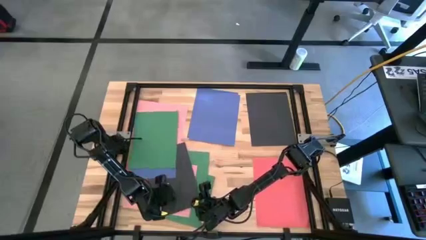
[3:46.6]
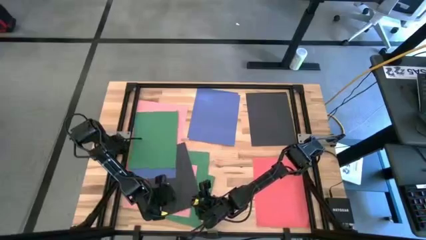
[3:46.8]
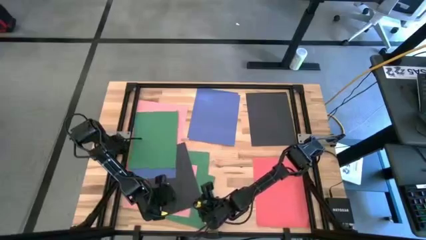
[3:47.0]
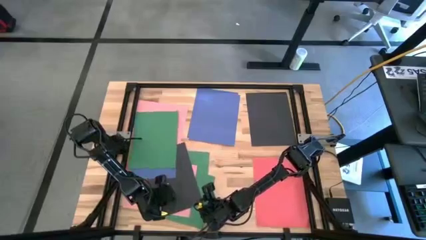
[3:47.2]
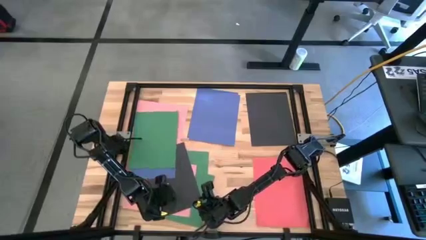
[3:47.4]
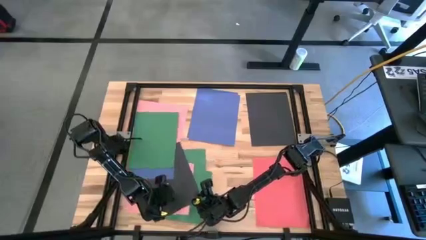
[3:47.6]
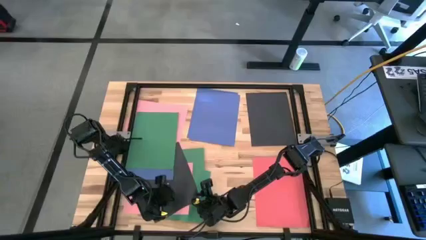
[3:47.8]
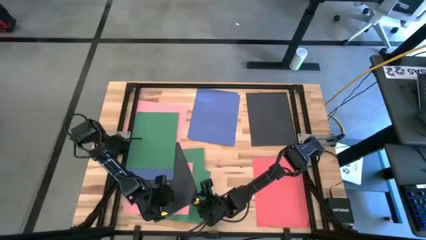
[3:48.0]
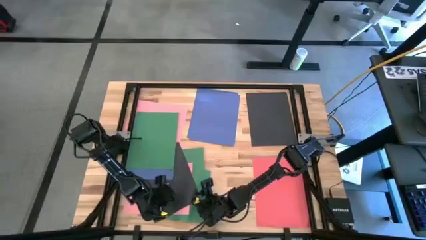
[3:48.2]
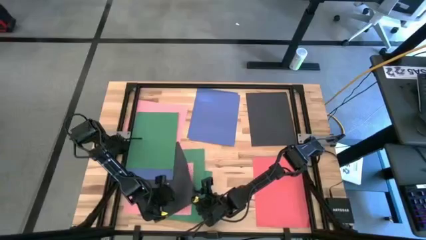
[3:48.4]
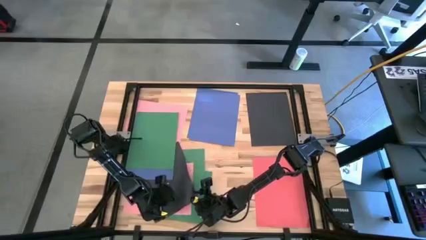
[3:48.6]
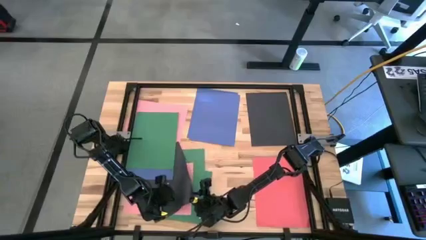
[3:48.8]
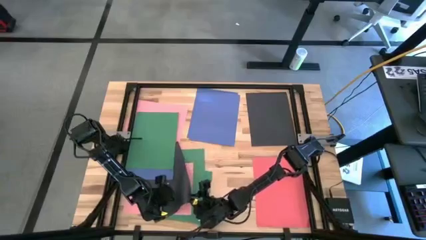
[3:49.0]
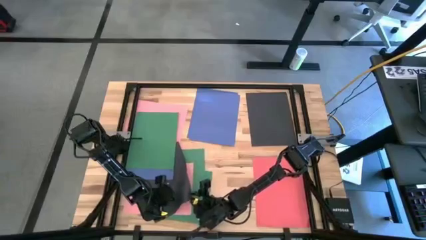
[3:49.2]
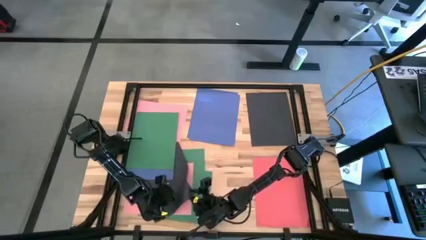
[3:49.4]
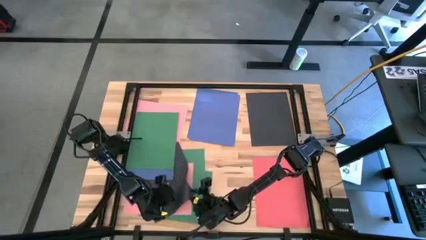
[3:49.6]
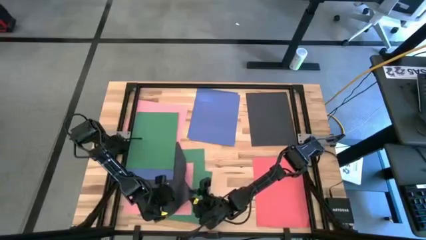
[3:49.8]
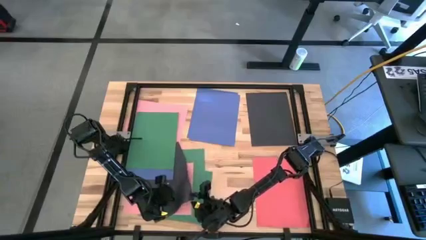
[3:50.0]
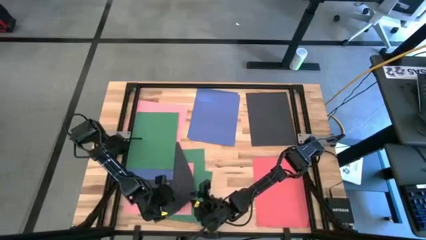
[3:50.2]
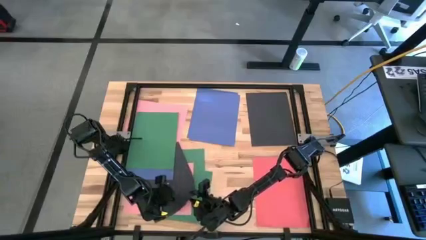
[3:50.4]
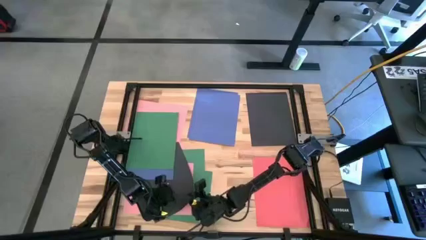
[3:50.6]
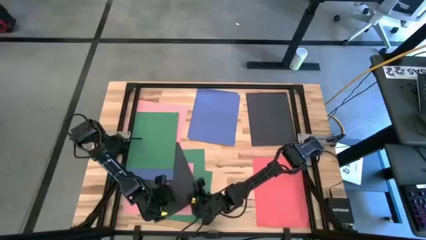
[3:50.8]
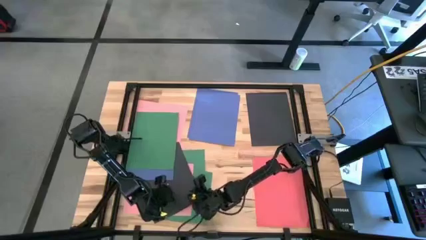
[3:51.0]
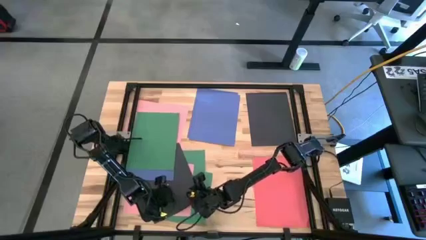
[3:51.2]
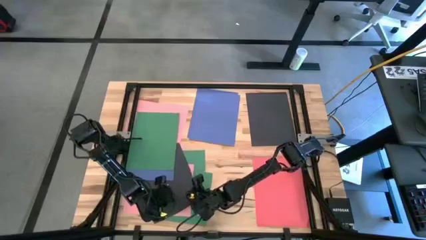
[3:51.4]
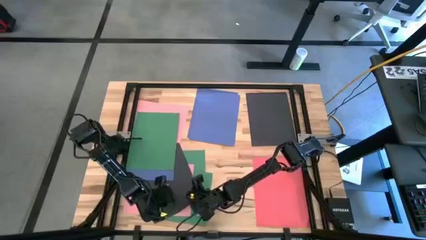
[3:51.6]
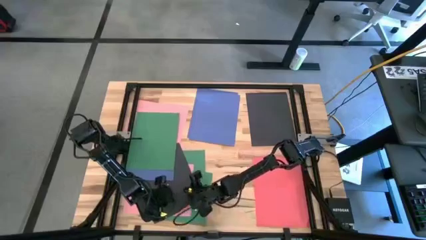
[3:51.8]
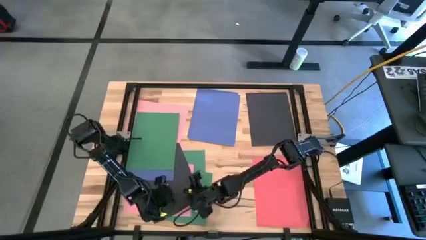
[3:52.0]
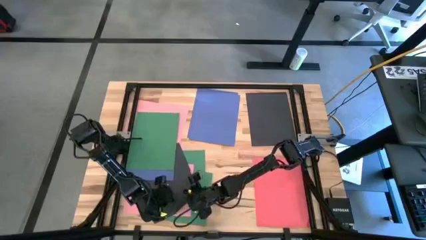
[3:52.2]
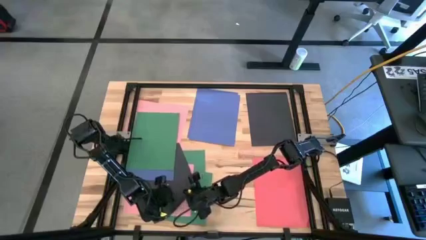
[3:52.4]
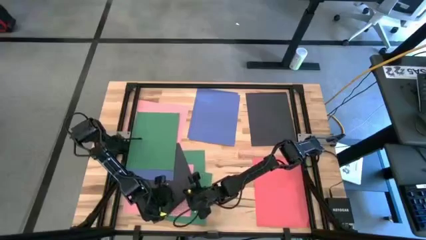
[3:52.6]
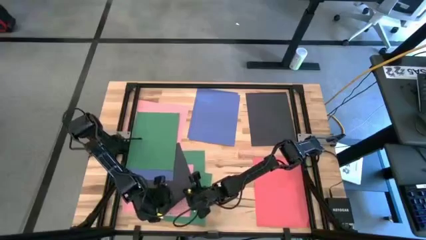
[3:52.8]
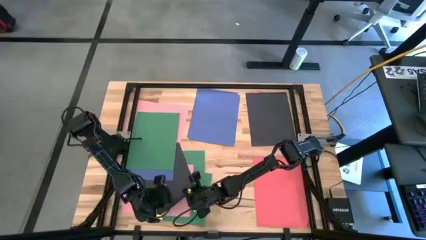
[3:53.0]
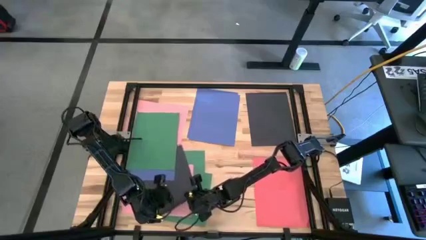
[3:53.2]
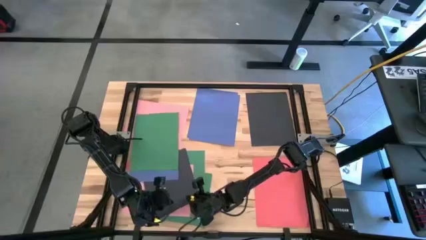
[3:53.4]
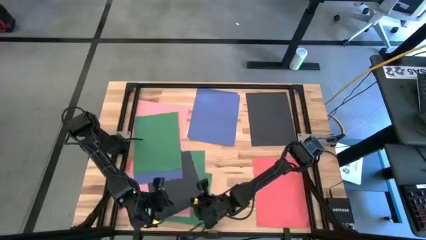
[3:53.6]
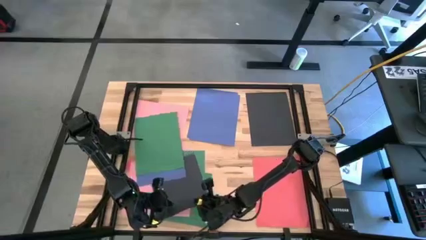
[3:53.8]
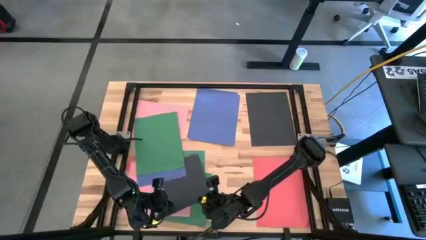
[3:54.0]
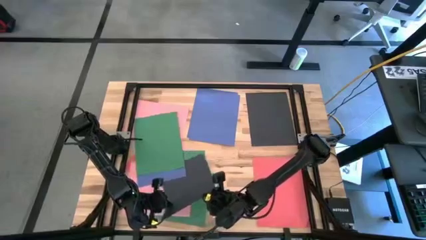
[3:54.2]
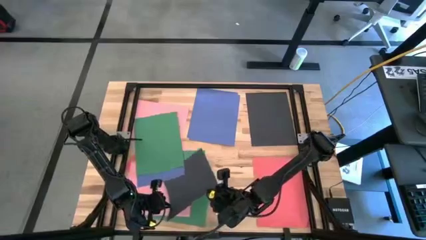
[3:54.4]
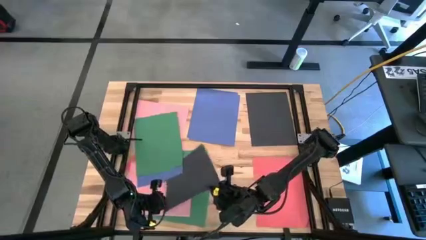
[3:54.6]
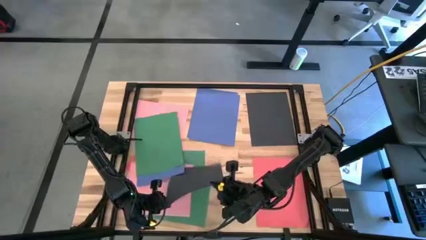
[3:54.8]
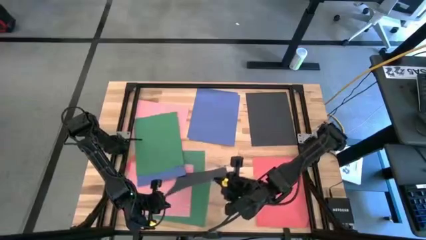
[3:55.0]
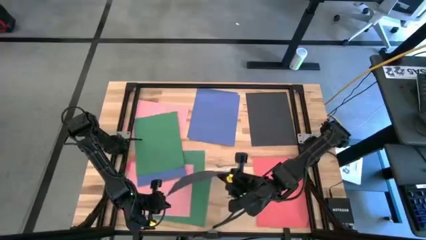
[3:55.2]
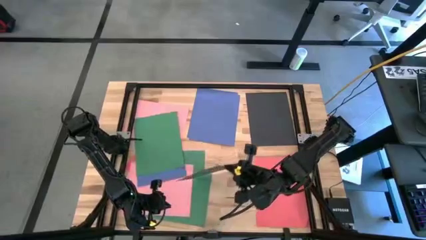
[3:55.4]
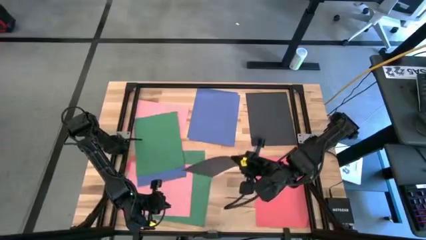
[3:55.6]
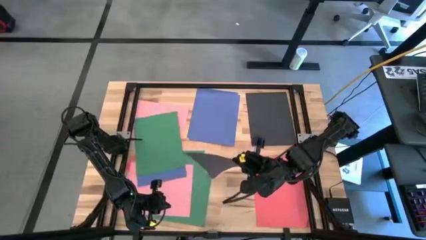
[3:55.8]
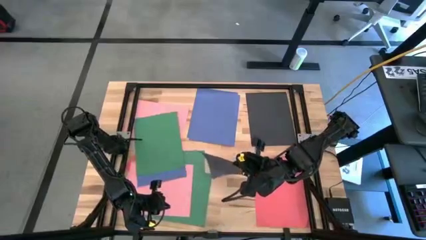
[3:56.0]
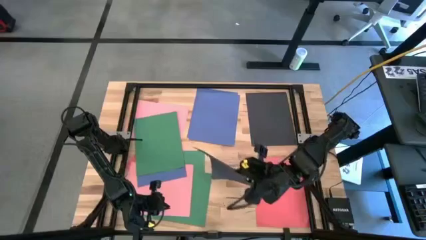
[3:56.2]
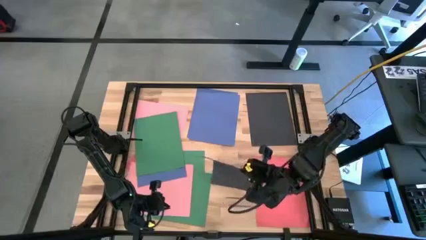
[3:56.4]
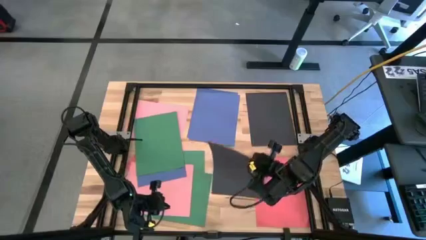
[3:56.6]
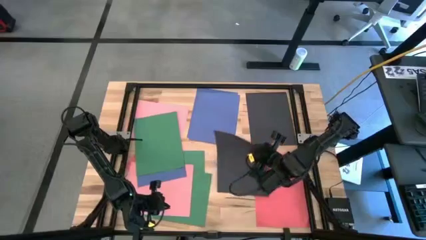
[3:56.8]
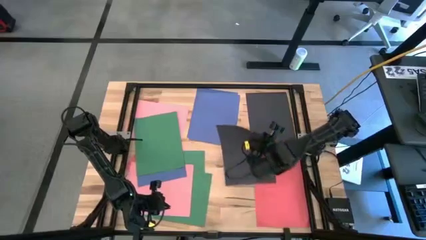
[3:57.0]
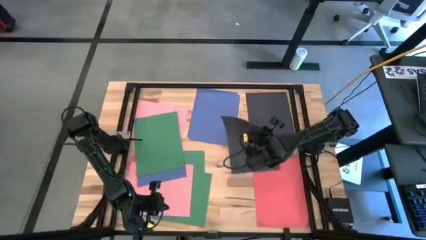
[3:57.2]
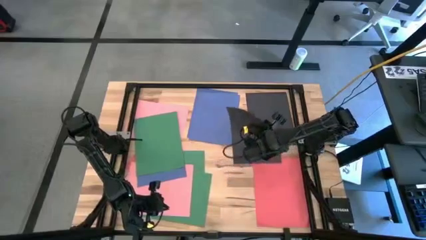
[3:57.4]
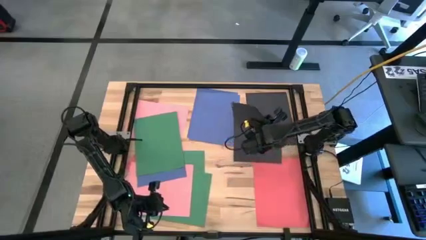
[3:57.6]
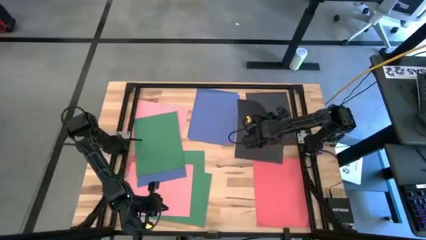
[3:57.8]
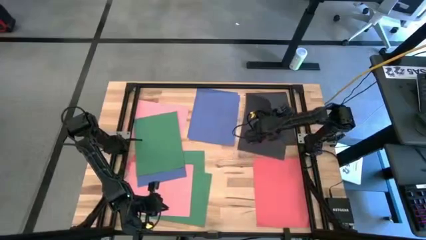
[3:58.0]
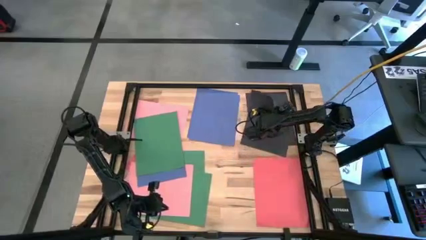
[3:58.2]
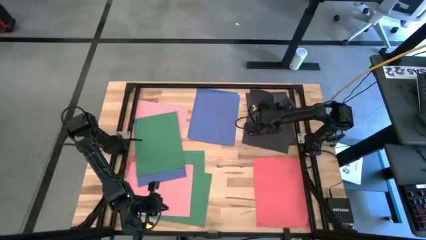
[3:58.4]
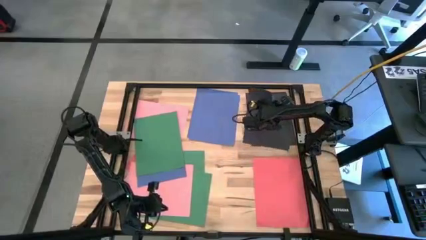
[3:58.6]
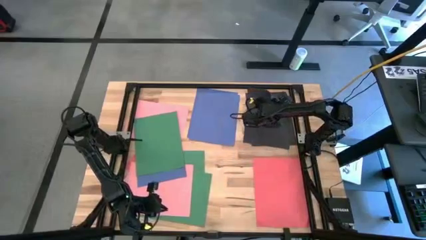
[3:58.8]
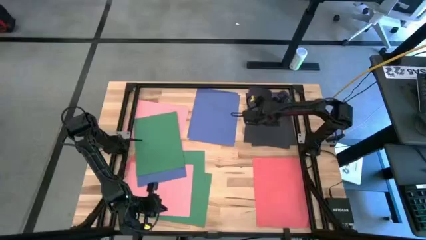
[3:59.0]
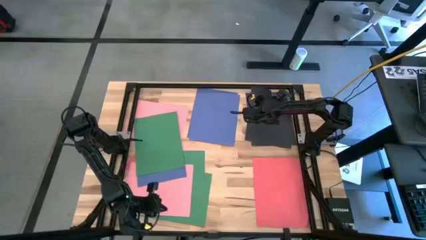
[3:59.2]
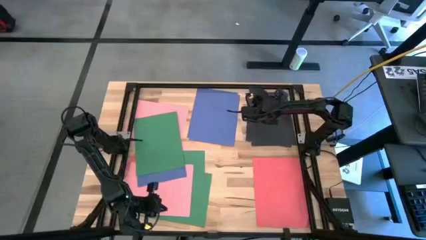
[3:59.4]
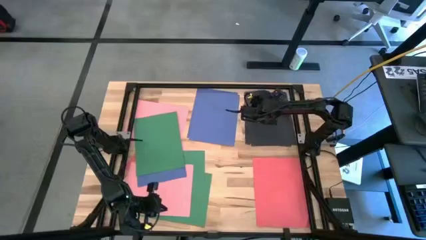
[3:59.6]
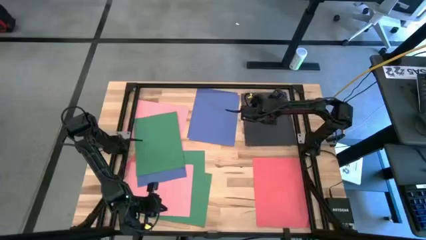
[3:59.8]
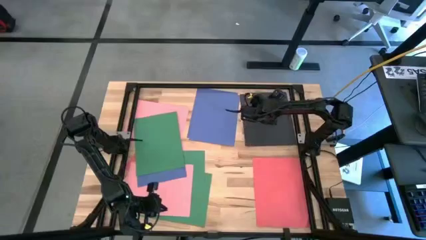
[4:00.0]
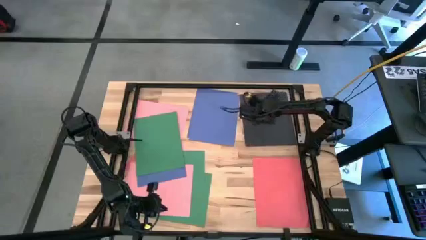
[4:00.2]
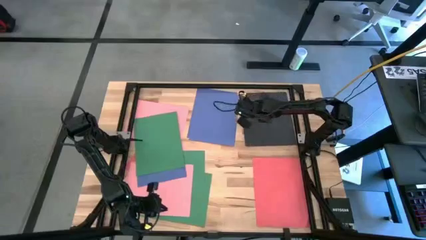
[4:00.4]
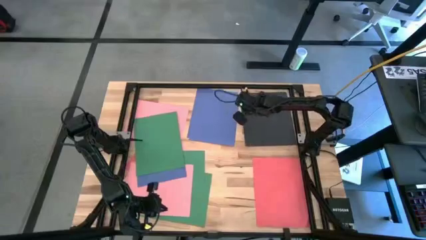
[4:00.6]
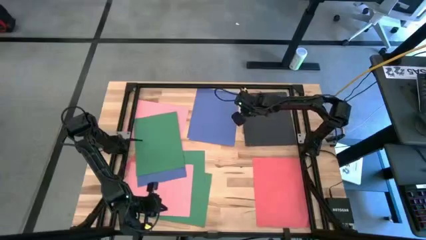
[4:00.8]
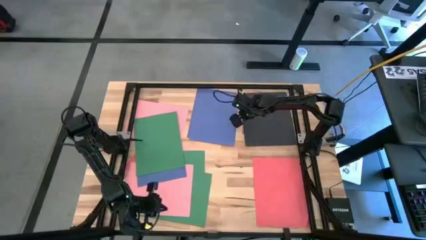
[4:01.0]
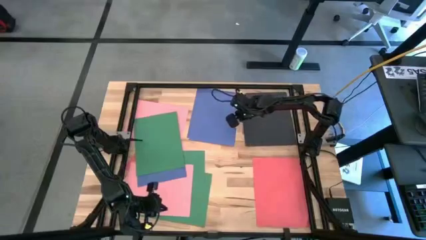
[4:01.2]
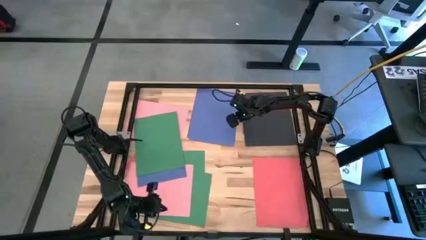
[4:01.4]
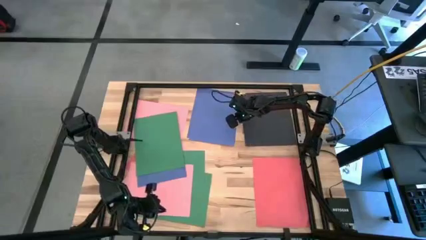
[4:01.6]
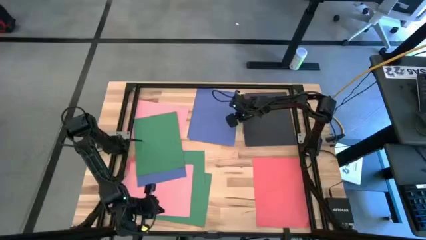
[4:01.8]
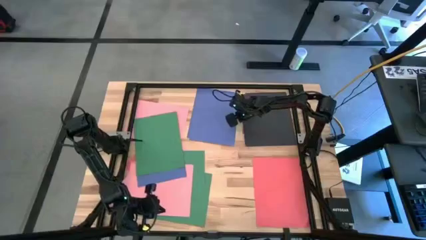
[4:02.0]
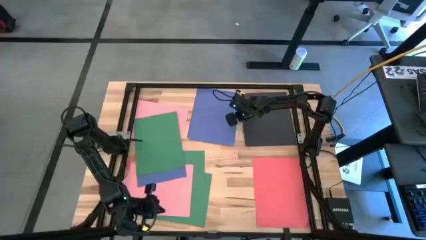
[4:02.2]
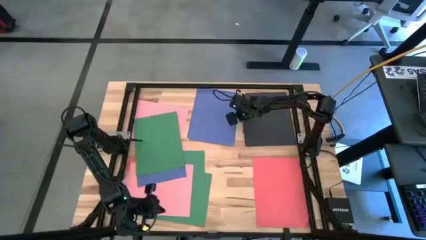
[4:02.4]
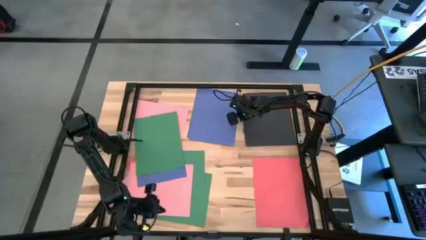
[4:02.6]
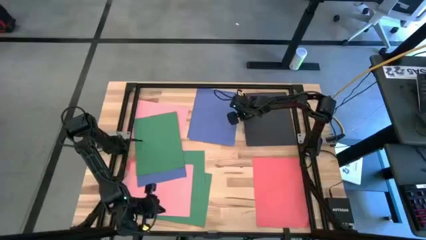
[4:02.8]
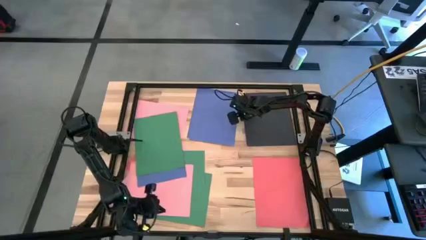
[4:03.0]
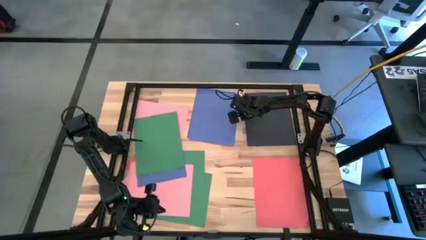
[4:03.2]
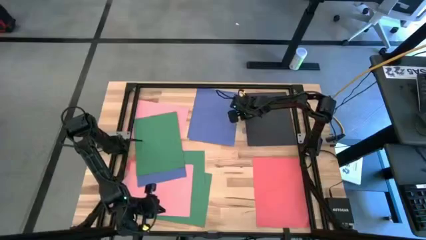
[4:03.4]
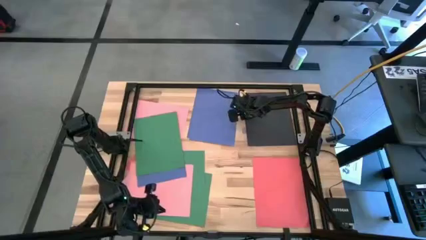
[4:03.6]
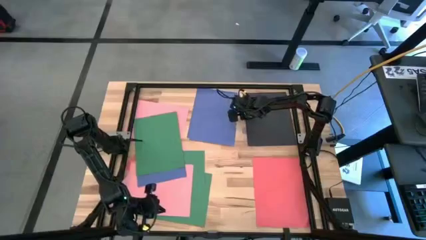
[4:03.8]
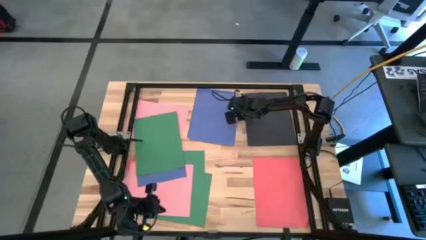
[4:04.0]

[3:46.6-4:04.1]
Task: Organize paper
Stack the black paper on top of the other black papers on the table
